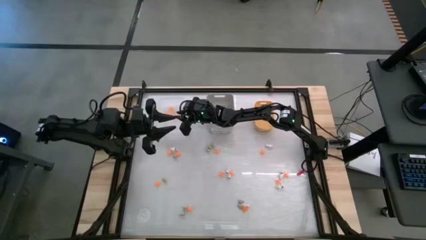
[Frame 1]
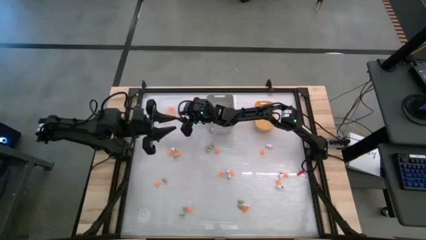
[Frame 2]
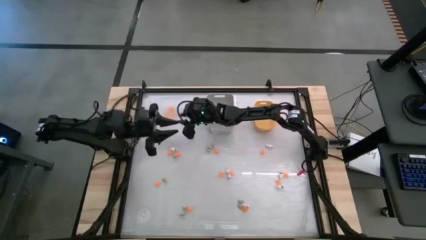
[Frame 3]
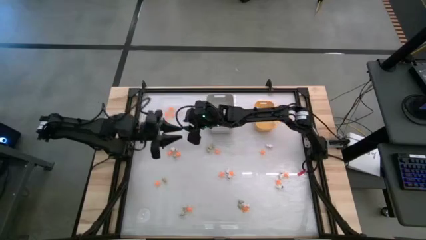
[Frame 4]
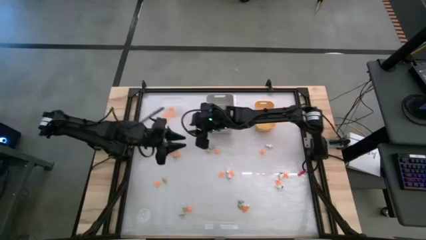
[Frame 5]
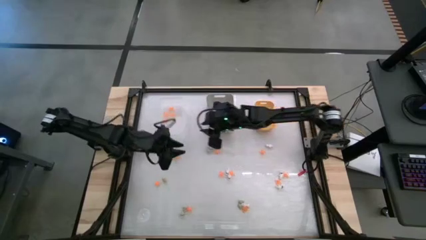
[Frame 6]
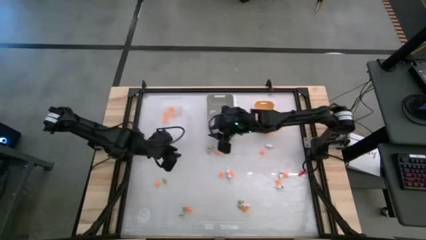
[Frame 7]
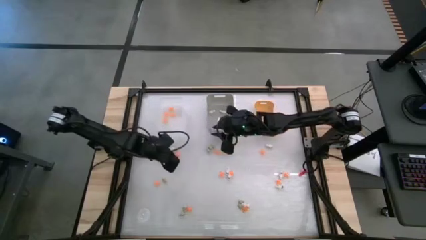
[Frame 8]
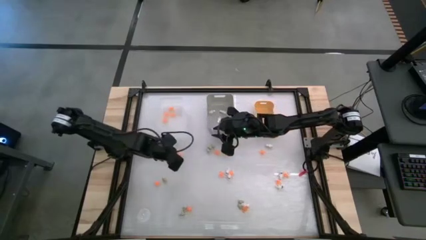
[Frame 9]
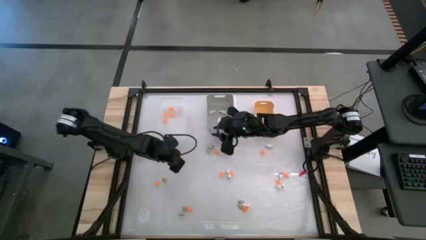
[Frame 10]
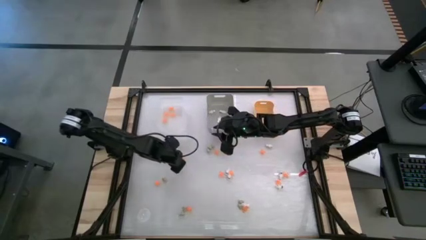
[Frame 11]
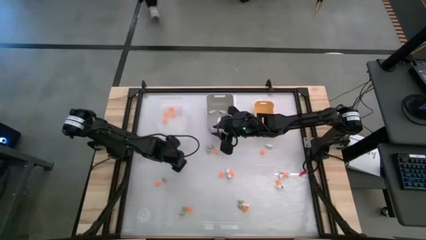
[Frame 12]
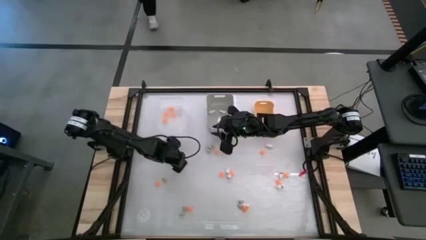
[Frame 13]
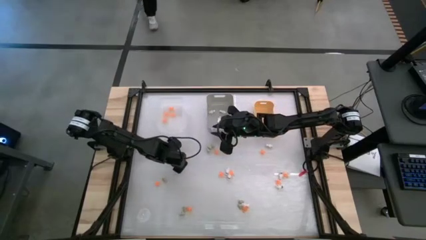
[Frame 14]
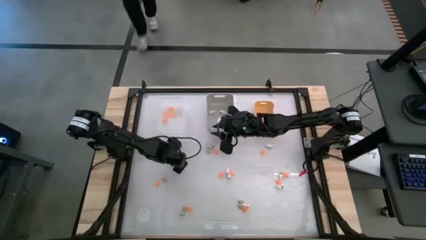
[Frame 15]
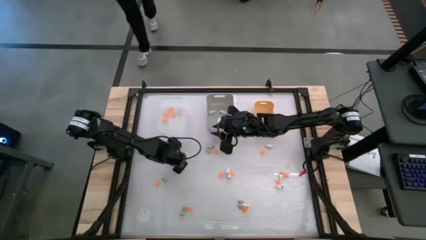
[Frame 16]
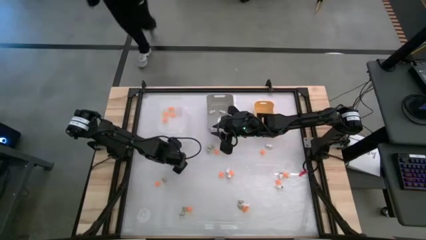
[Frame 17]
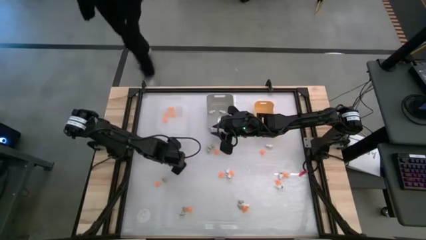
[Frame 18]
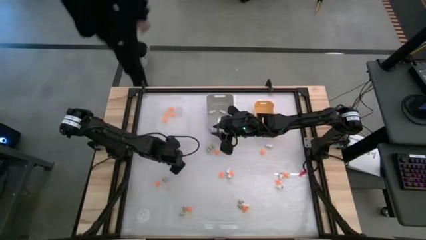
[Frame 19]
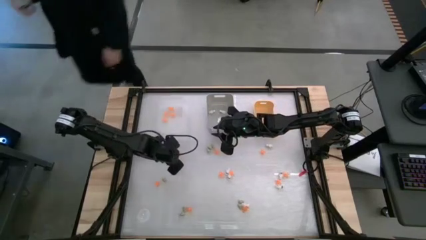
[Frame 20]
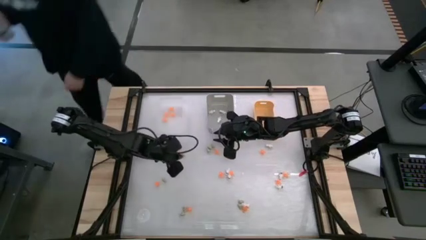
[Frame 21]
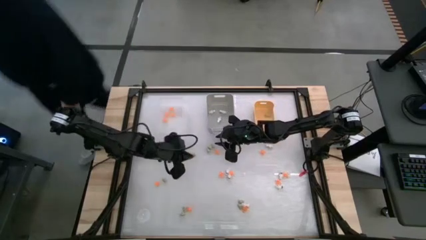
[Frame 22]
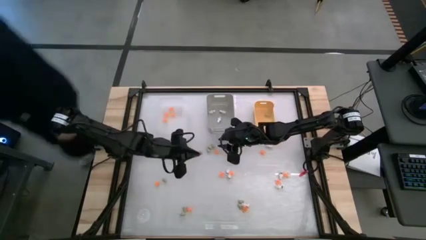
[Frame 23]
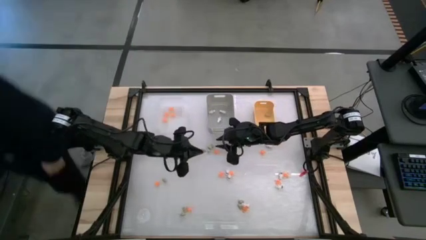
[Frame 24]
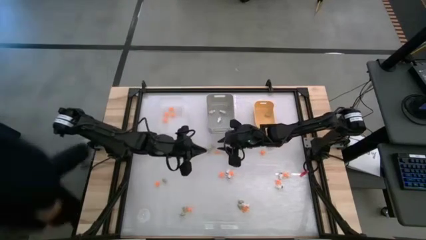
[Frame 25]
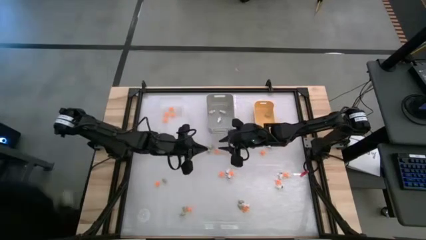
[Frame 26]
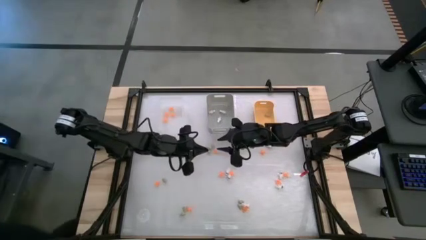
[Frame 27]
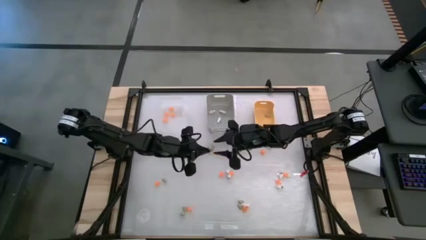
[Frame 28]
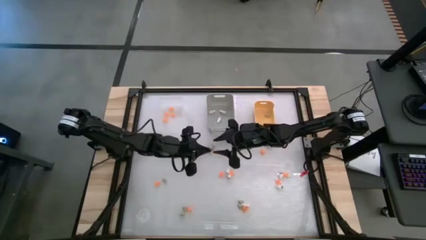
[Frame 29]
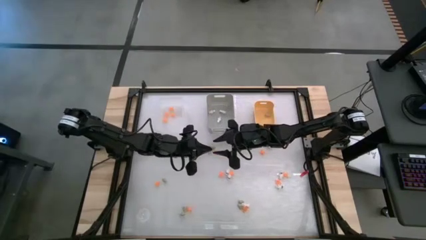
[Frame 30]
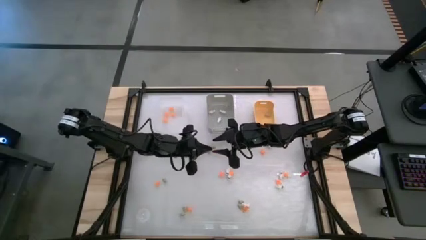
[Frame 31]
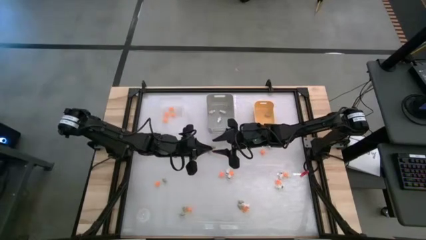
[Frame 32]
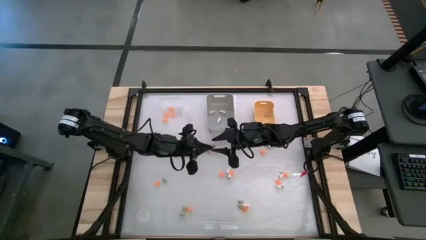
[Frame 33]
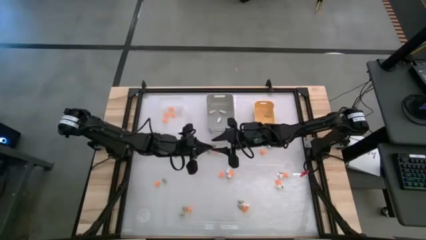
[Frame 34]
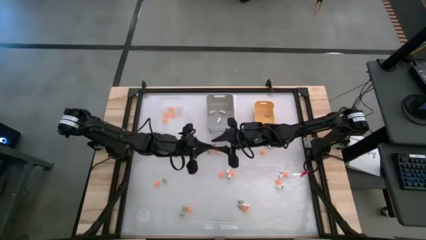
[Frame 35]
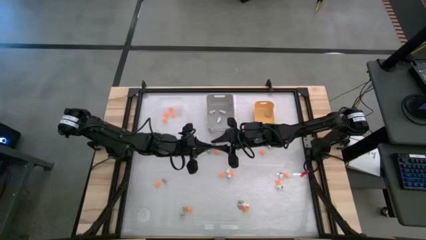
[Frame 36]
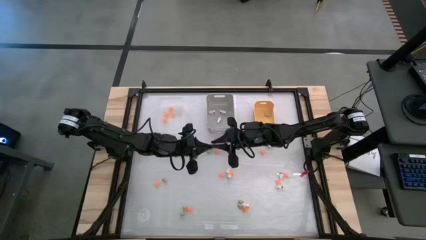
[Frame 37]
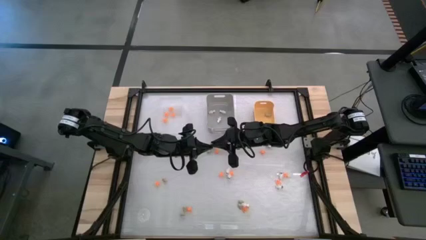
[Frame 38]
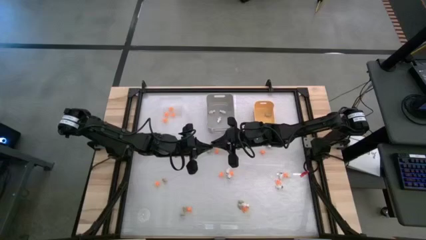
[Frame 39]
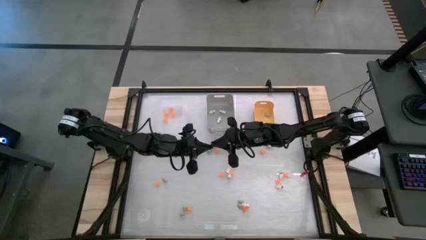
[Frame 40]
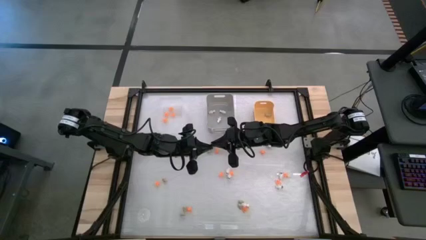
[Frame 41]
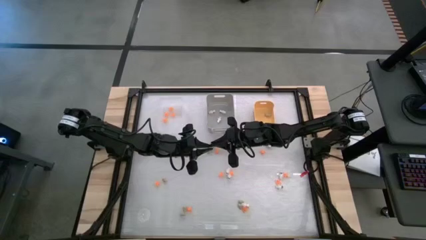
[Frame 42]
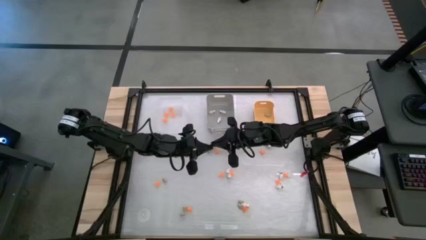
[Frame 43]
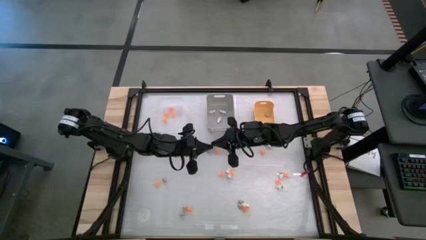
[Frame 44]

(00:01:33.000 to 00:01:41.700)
Task: Sort Halloween decoration
Put the cream white skull toy into the yellow bin

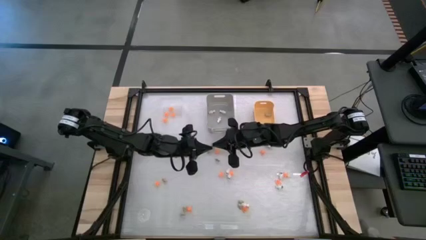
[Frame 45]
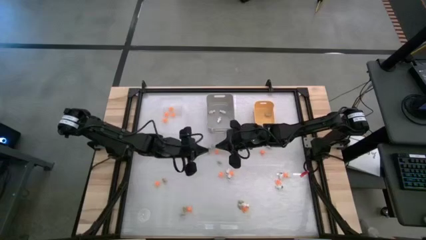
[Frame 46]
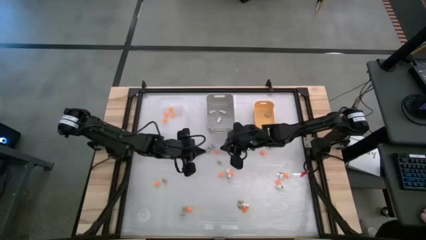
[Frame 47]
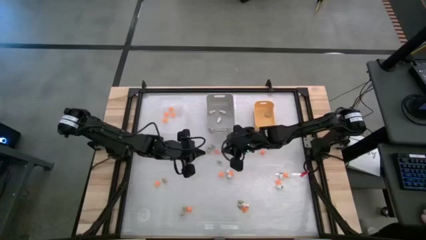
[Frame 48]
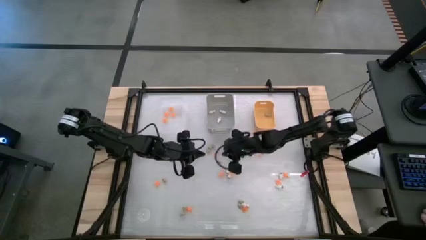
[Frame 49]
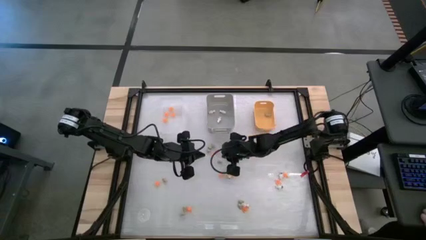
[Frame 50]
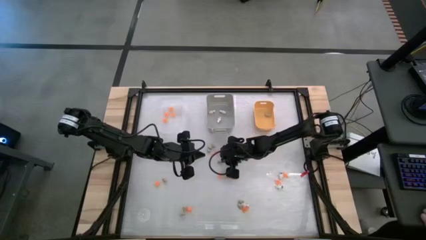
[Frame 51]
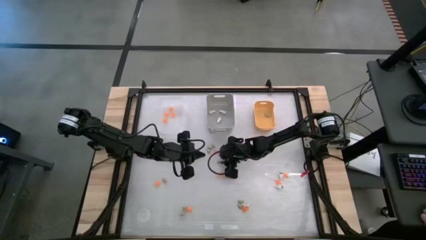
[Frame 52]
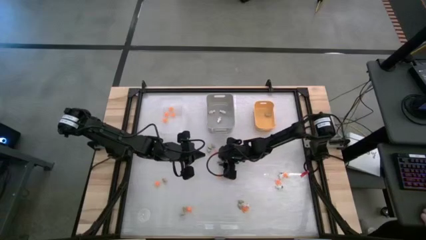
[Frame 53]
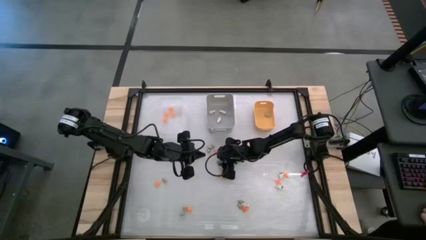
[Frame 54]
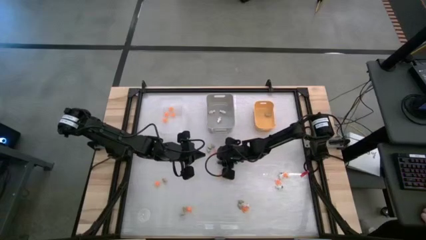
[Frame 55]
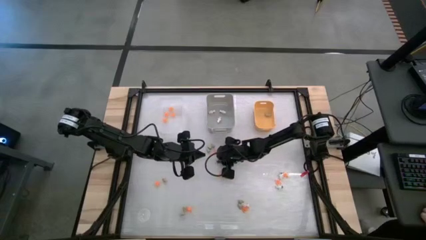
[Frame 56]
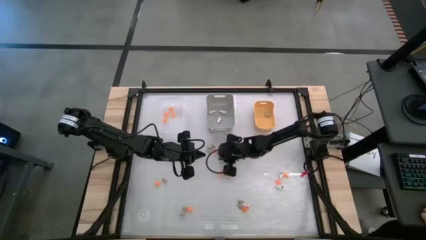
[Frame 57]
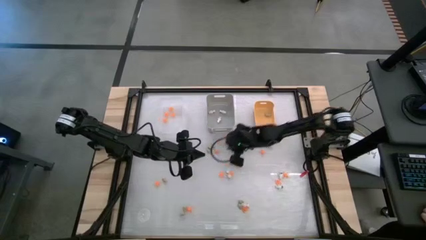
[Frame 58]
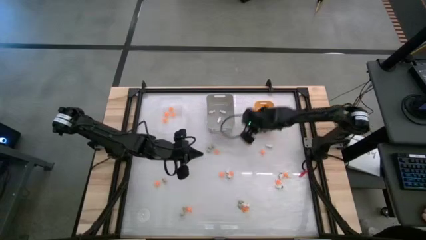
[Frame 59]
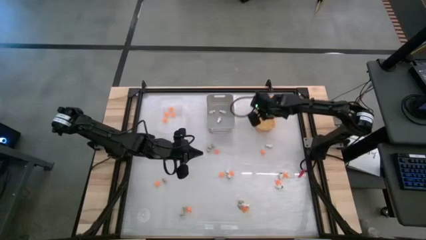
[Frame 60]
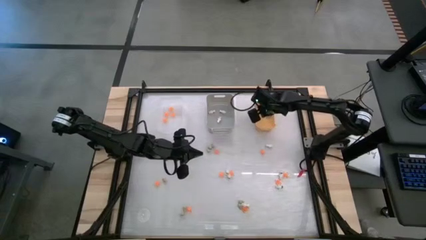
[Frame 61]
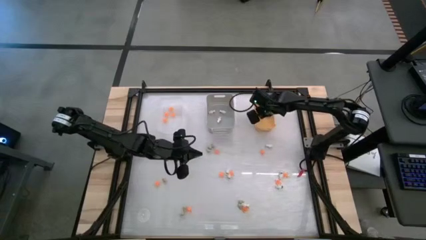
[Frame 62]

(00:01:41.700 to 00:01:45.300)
Put the cream white skull toy into the yellow bin

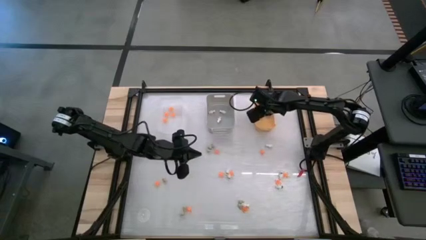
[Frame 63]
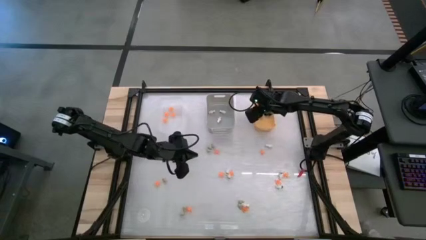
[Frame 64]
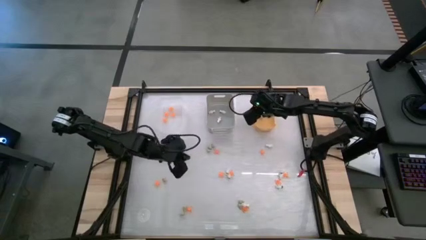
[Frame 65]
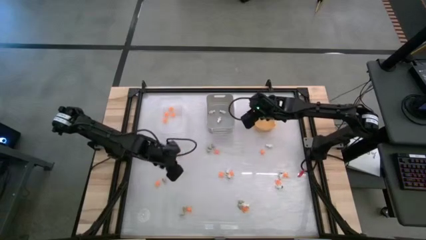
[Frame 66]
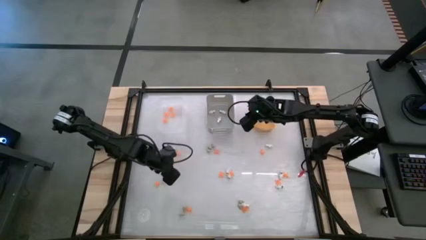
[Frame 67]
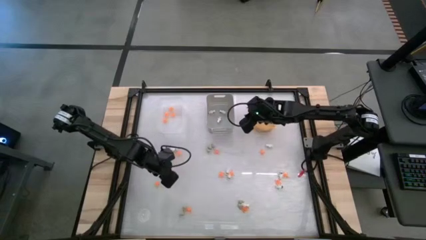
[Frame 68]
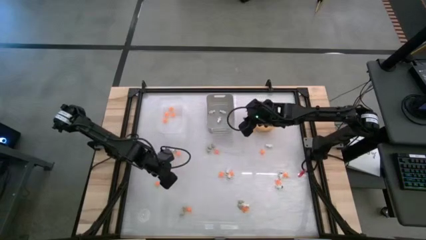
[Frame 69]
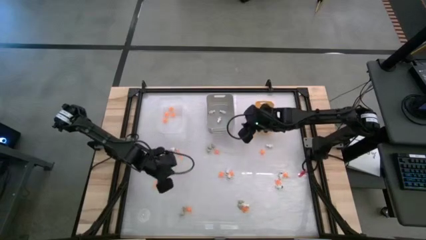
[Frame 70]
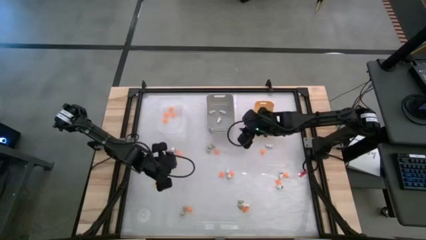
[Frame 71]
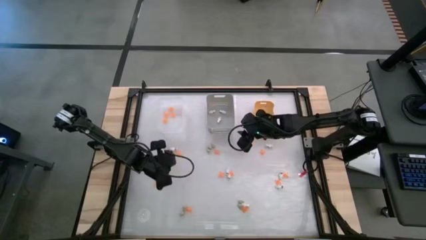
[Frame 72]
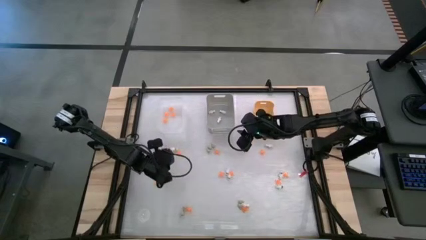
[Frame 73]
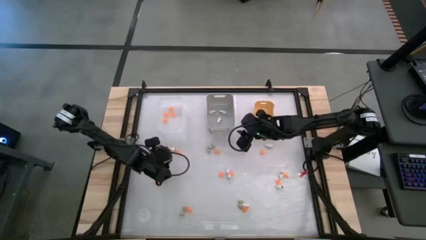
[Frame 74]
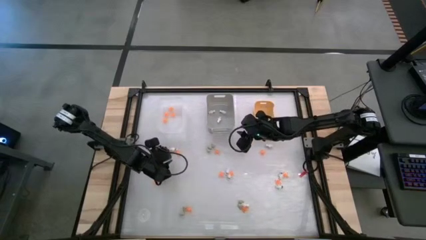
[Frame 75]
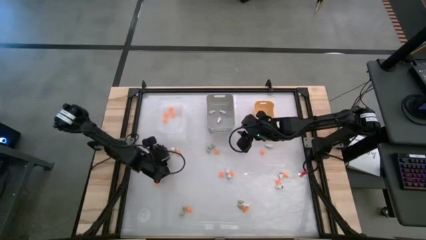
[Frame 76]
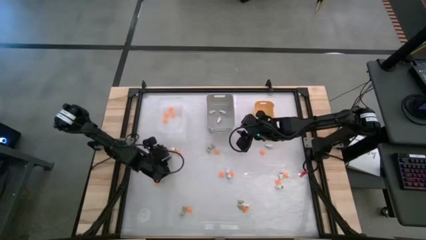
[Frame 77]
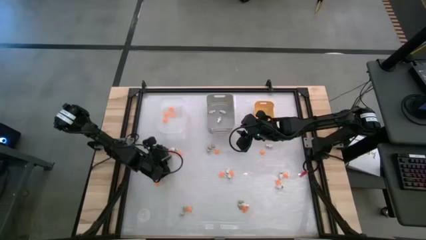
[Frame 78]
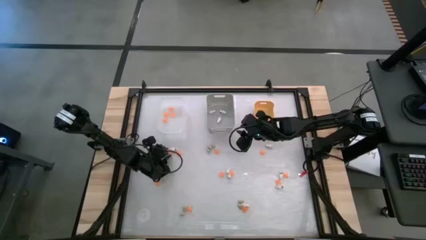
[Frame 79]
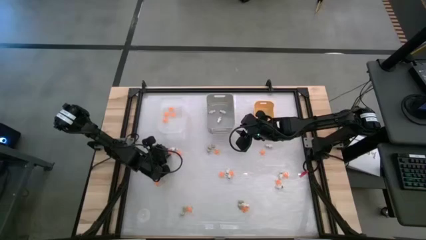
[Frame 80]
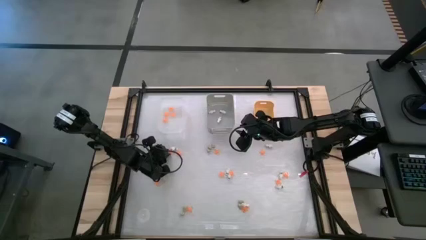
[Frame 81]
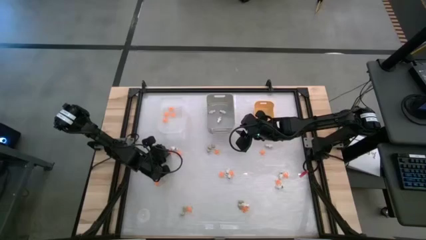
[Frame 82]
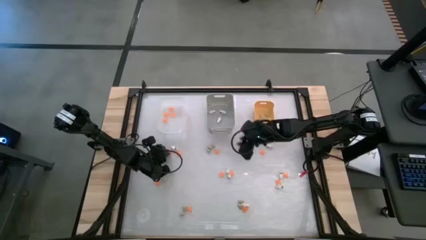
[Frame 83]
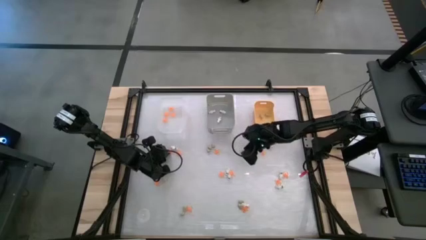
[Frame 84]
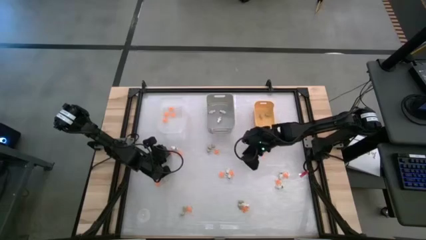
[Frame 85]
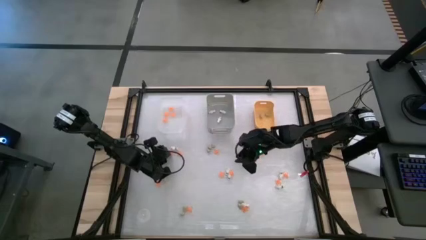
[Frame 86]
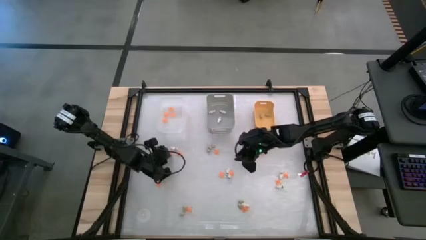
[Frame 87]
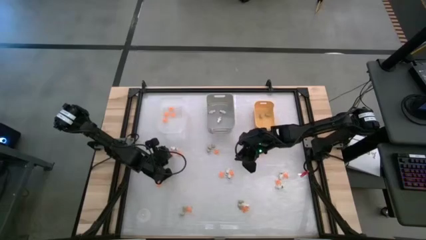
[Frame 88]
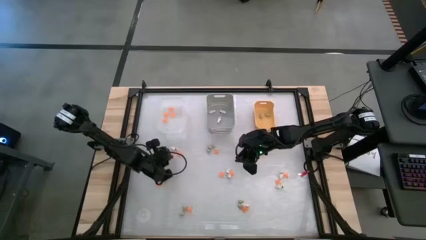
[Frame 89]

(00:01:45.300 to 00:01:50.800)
Put the orange spider toy into the transparent white bin
